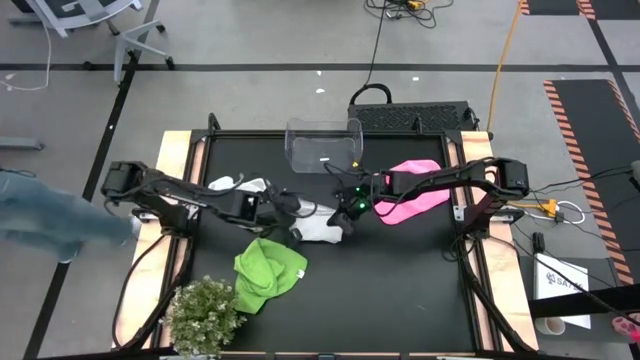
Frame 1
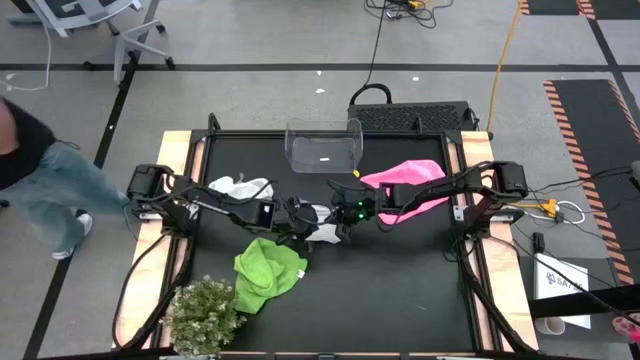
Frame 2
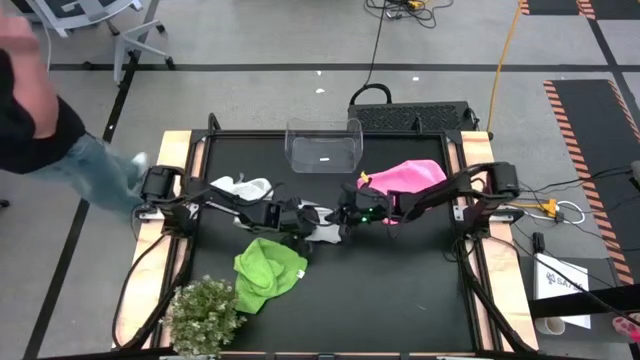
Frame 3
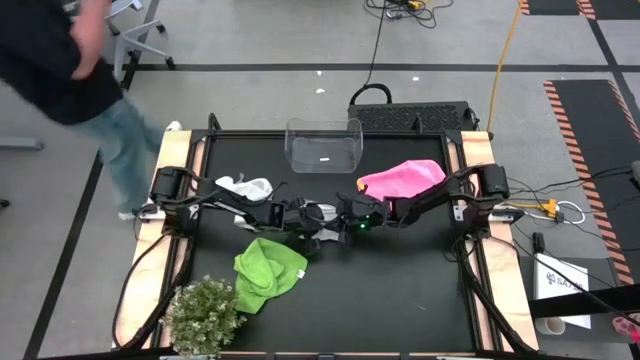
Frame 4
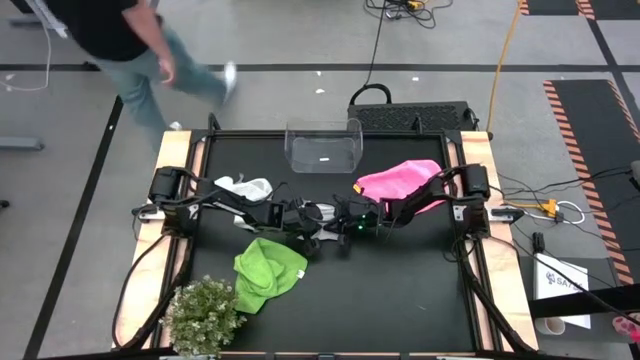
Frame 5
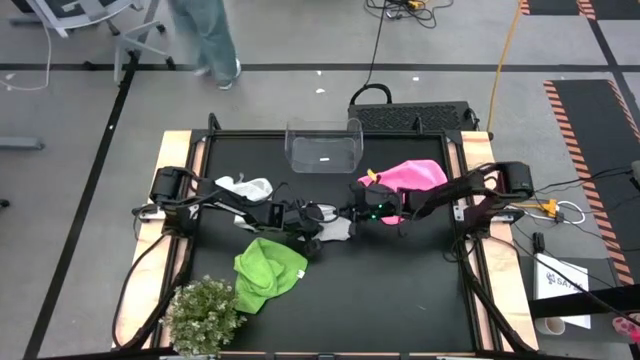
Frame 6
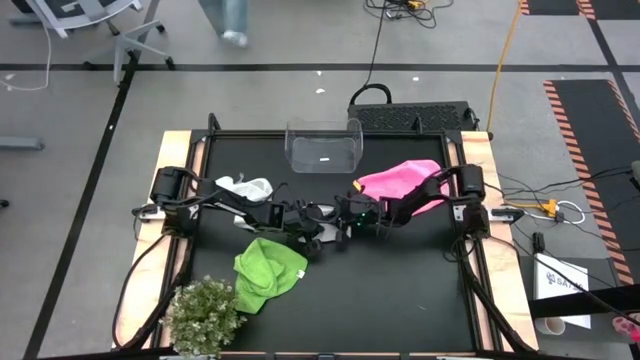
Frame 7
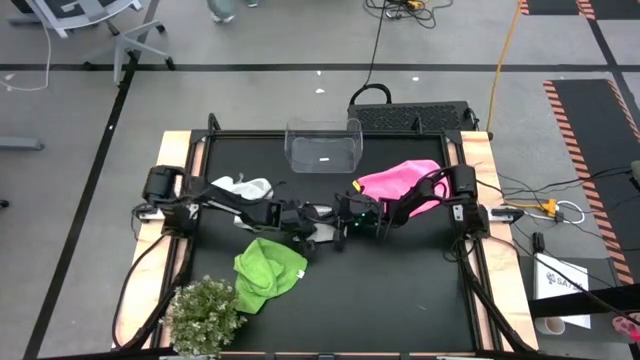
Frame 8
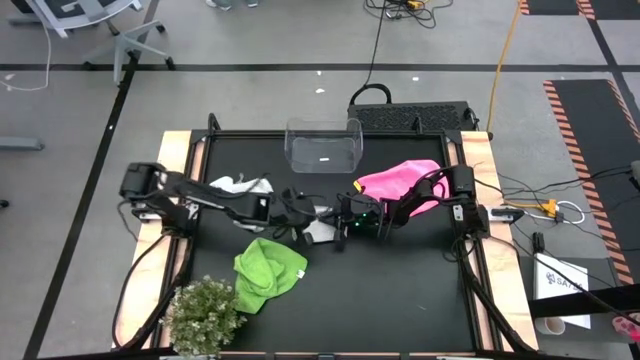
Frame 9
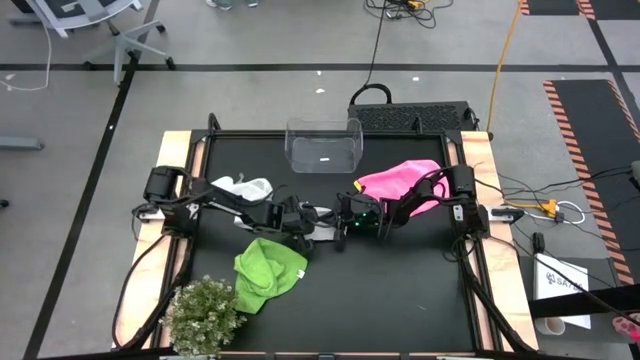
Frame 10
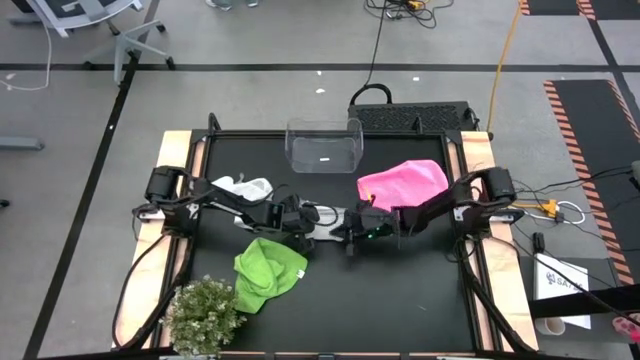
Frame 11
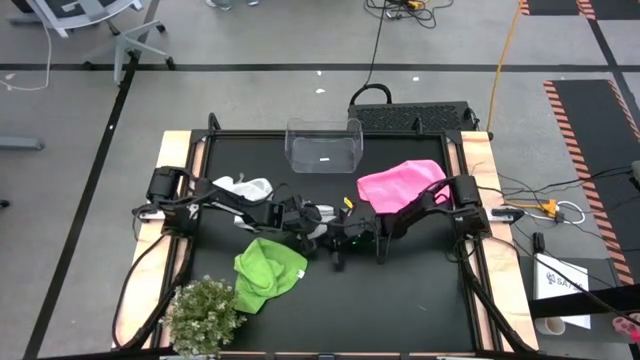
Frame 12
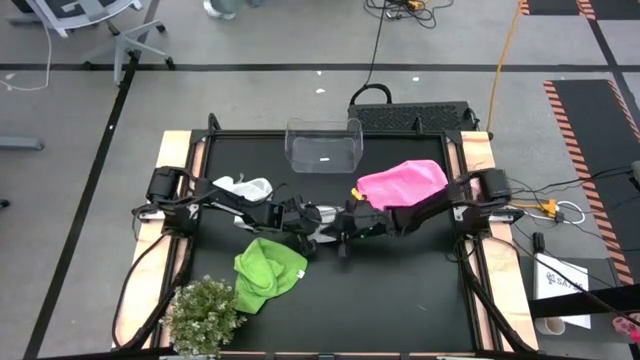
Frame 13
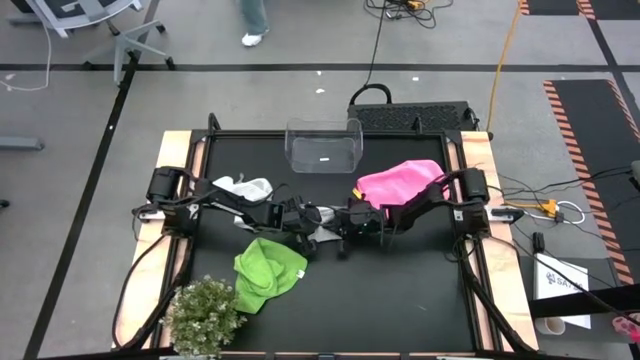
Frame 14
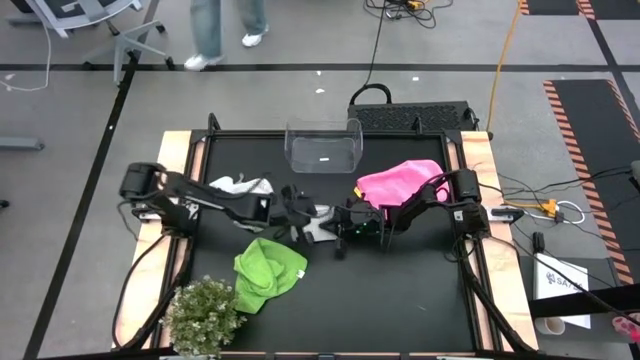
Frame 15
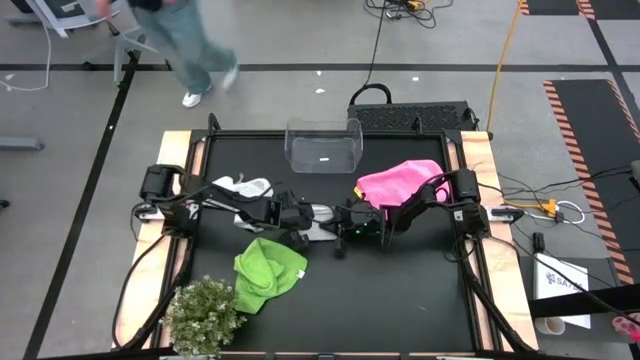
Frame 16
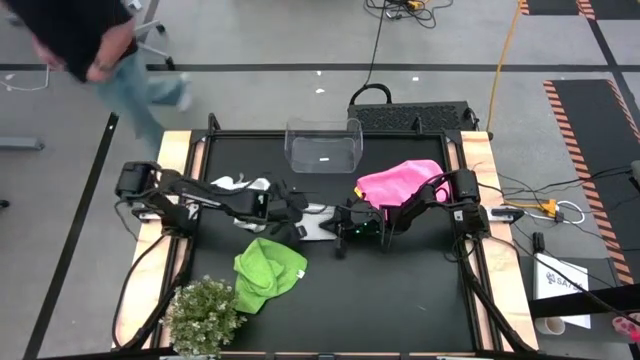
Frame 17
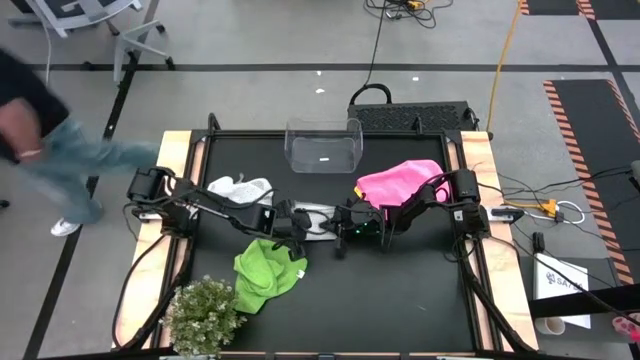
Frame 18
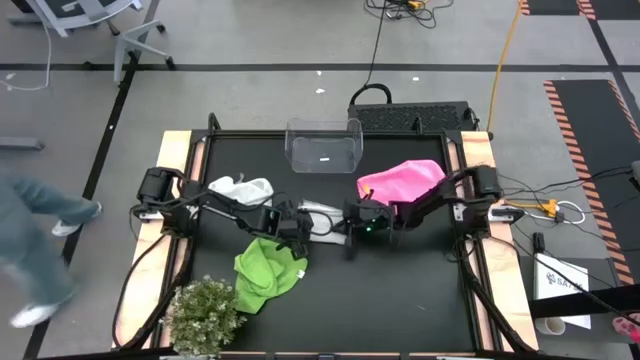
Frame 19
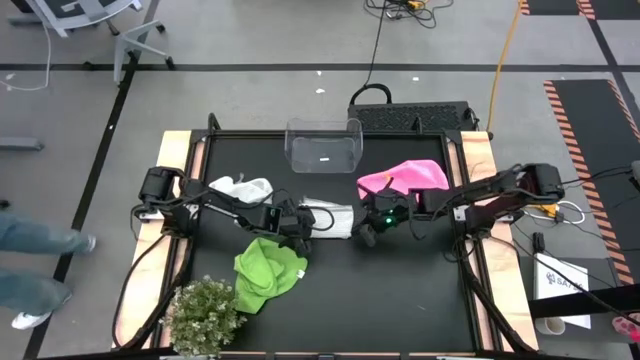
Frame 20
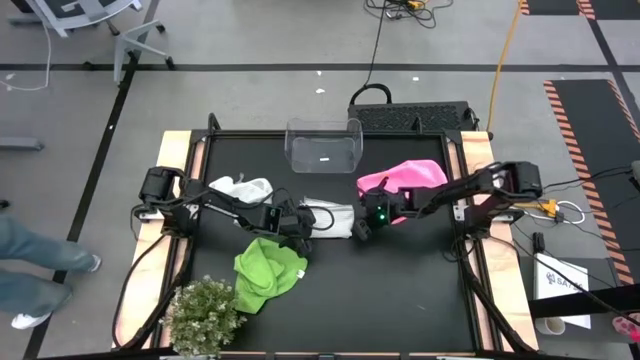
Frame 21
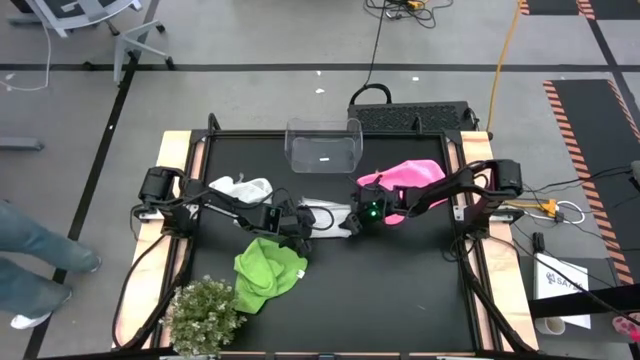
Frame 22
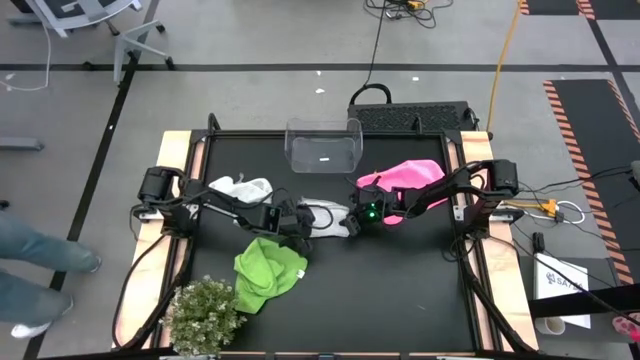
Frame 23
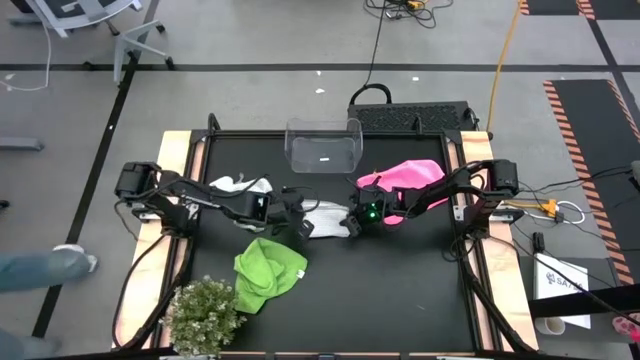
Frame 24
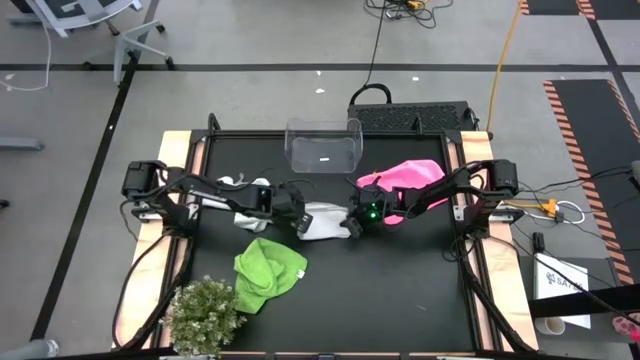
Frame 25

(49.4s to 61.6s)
Task: Fold microfiber towels
Put the right gray microfiber cloth into the transparent bin

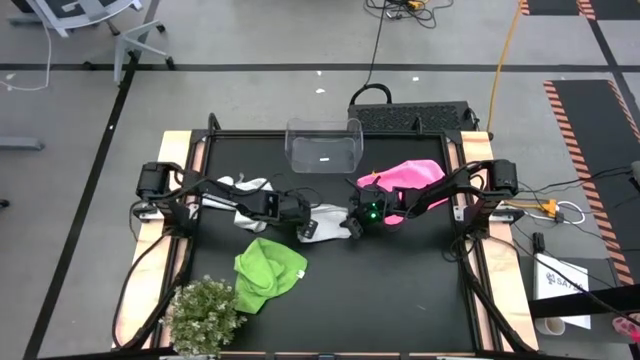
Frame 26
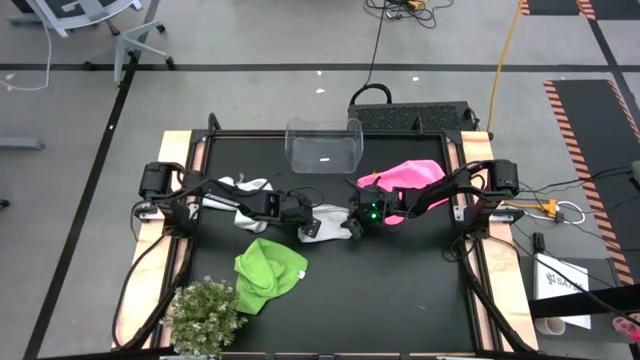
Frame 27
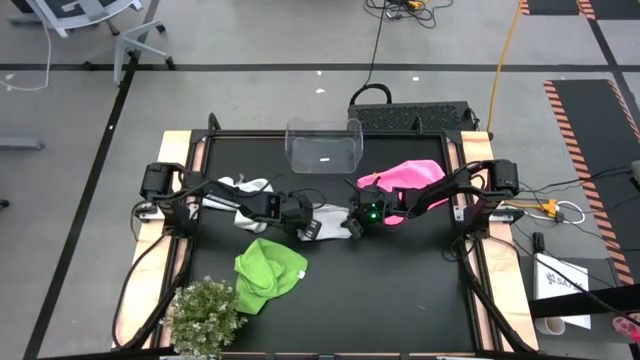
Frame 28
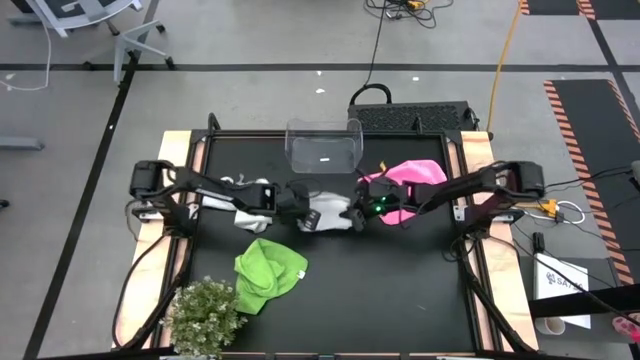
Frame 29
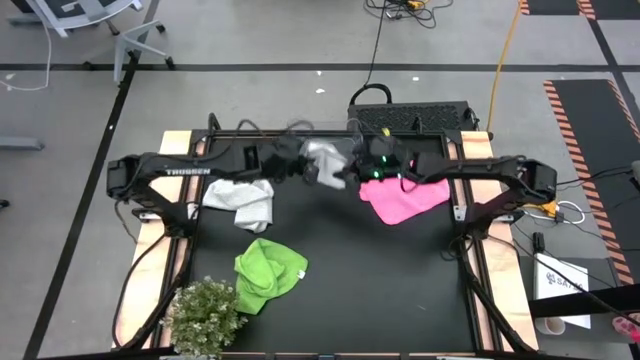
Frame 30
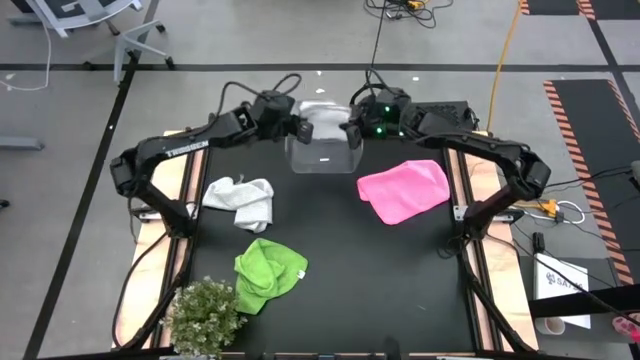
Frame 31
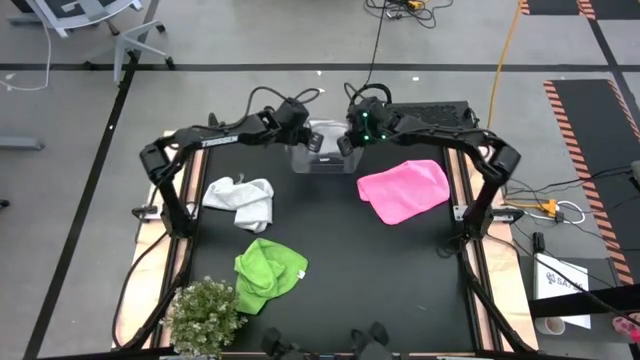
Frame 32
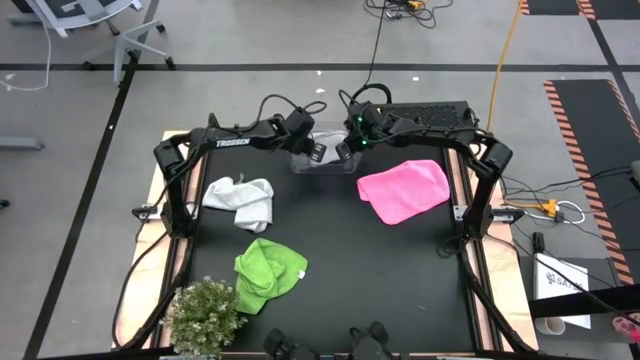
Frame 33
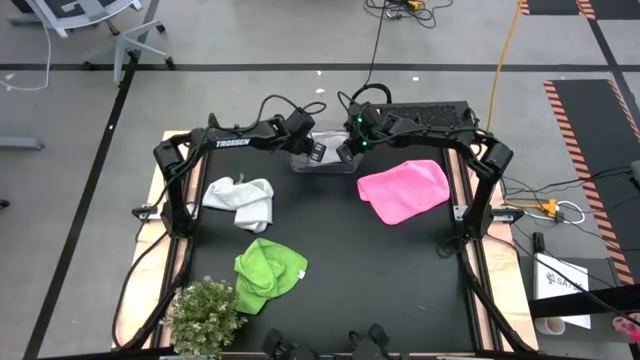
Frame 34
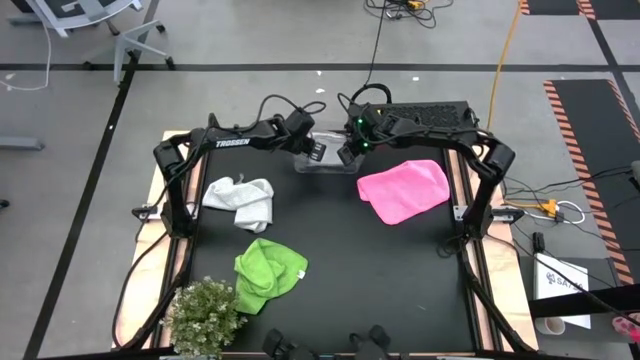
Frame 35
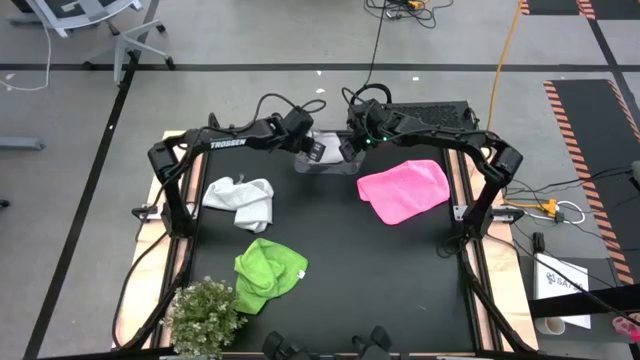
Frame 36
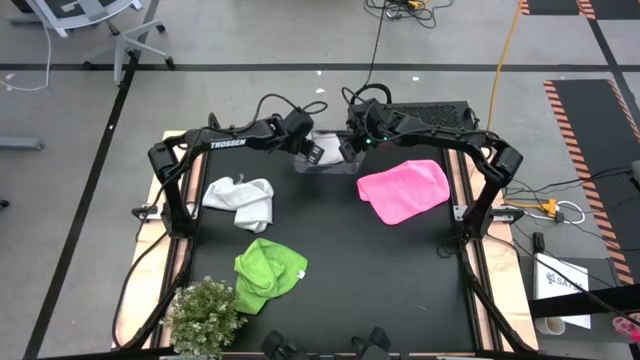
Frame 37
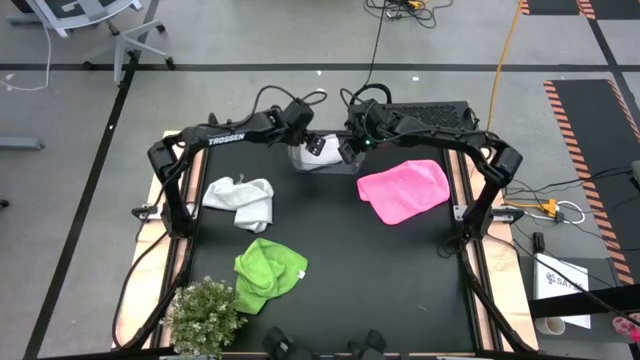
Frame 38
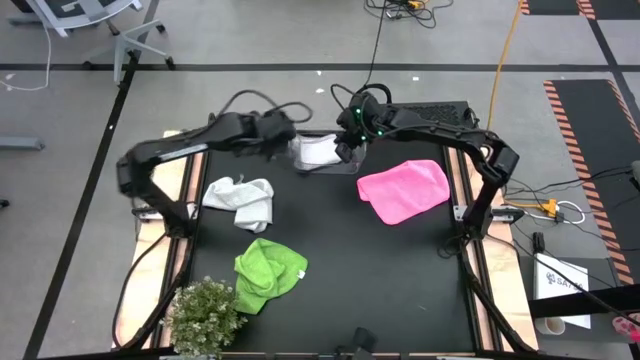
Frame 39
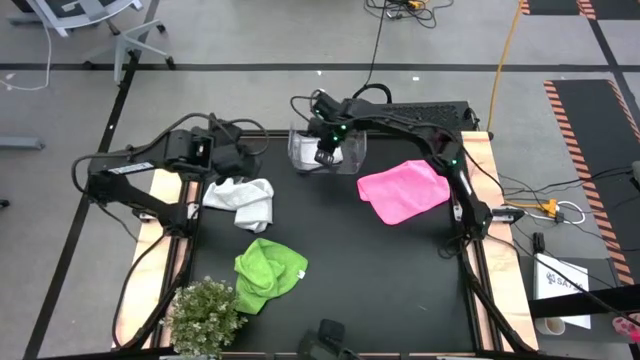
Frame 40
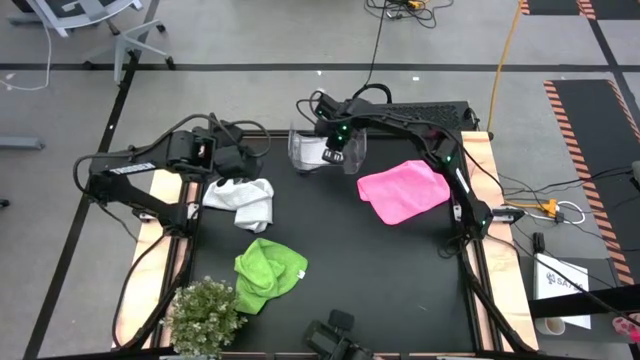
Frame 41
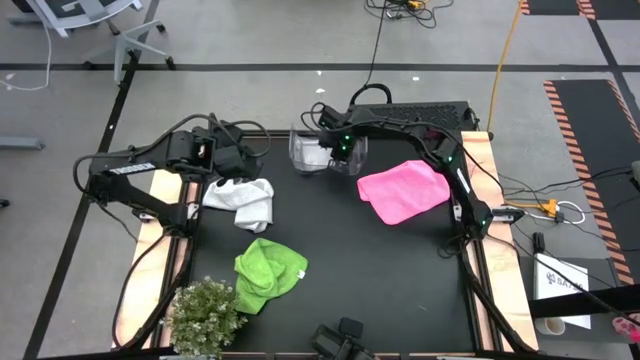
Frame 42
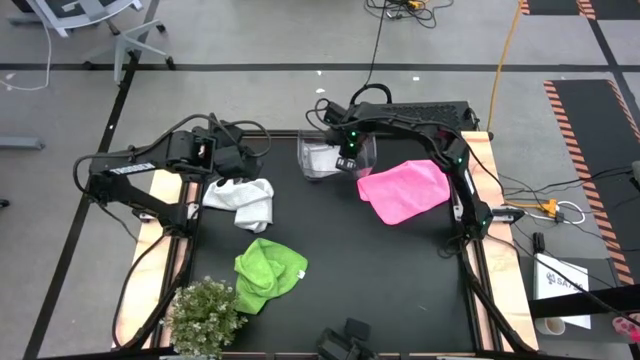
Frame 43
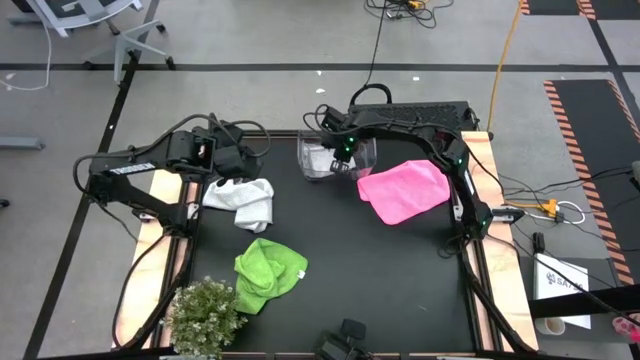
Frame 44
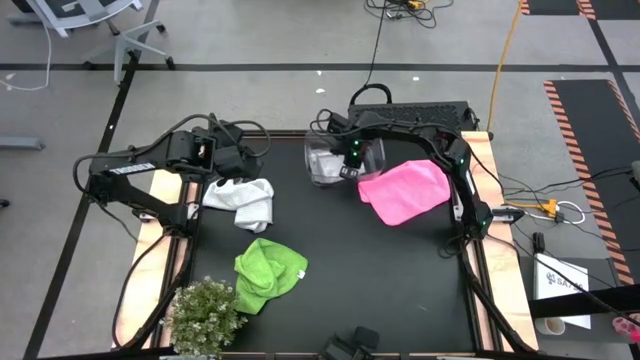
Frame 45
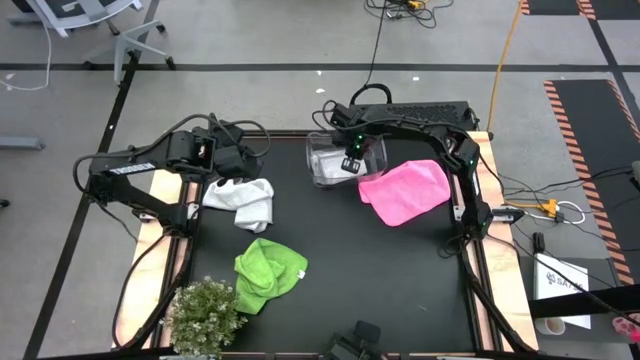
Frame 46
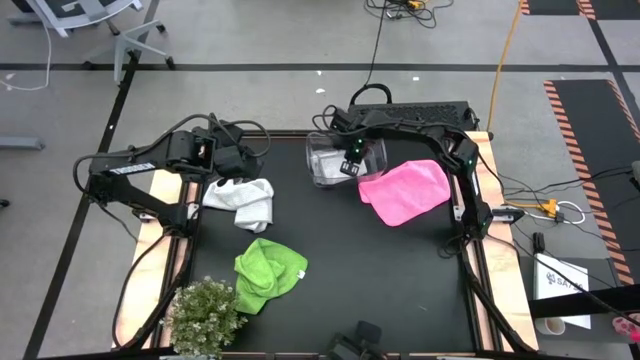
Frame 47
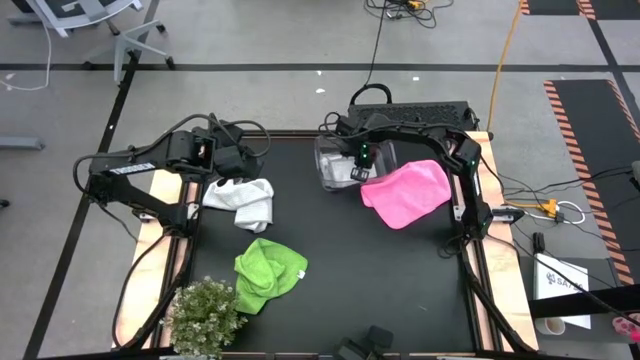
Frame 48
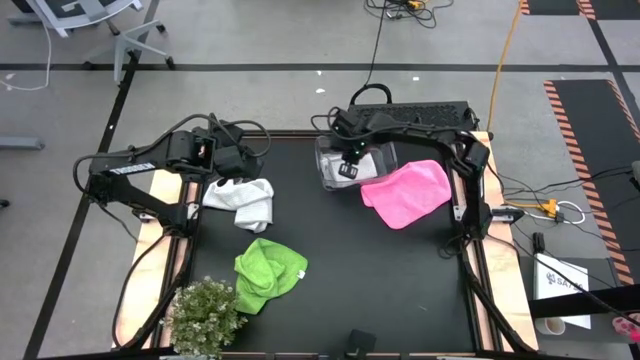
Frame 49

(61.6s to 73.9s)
Put the right gray microfiber cloth into the transparent bin
